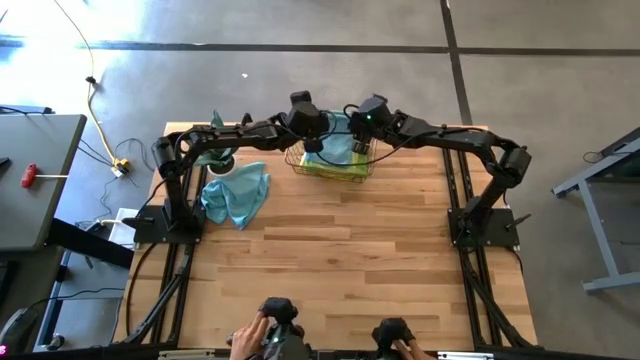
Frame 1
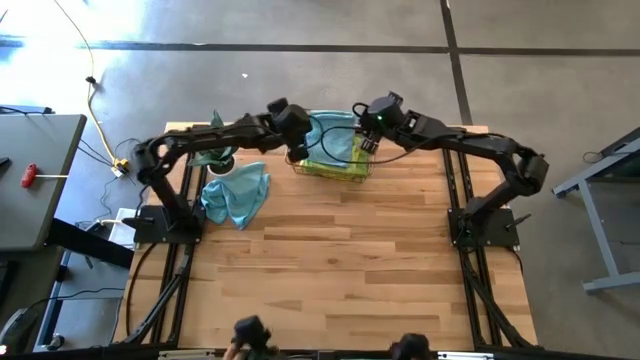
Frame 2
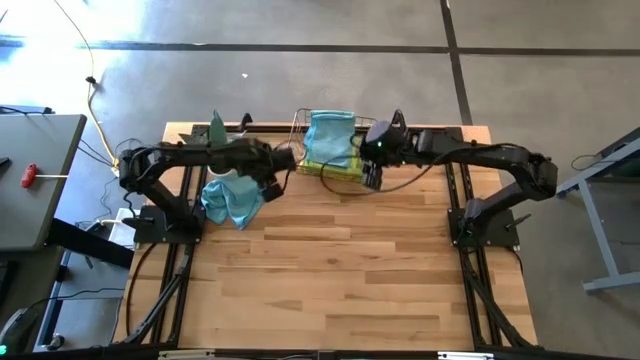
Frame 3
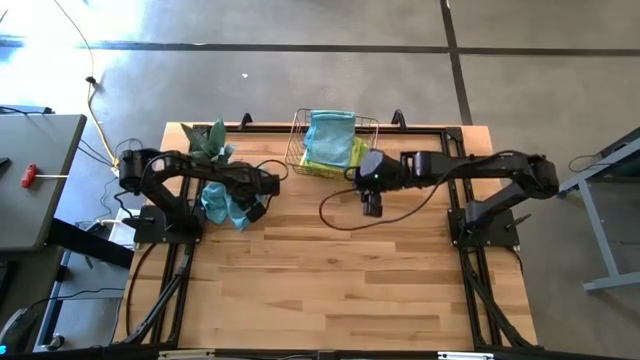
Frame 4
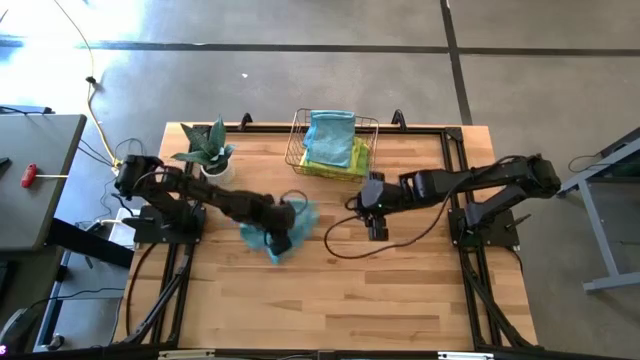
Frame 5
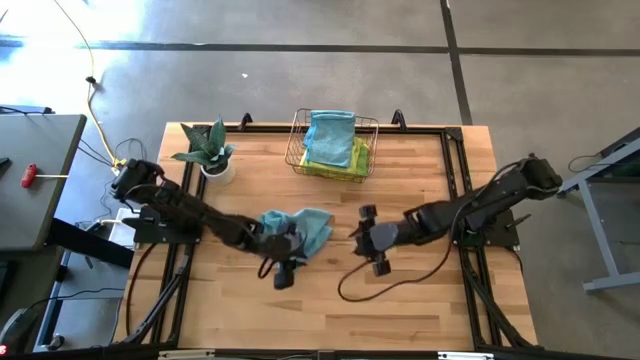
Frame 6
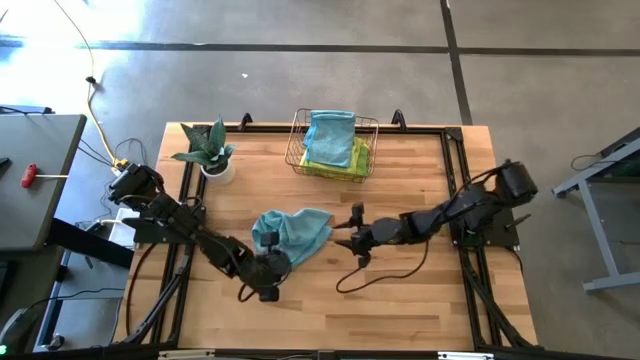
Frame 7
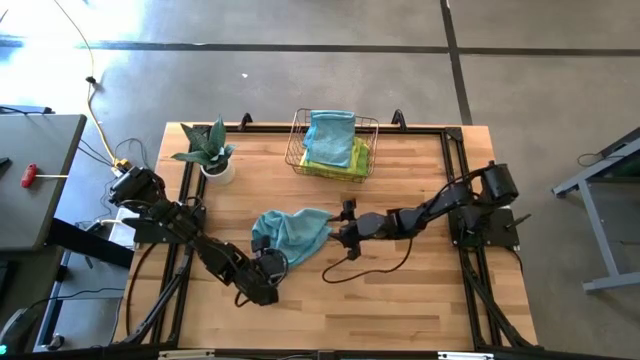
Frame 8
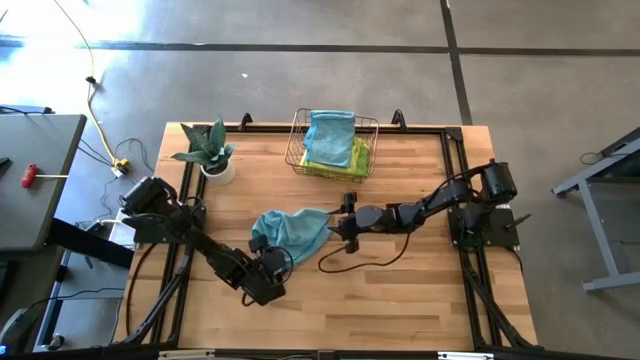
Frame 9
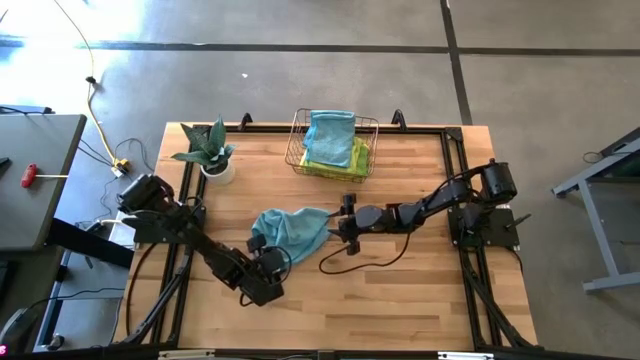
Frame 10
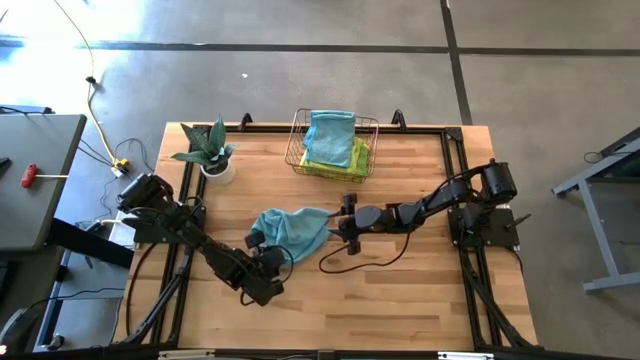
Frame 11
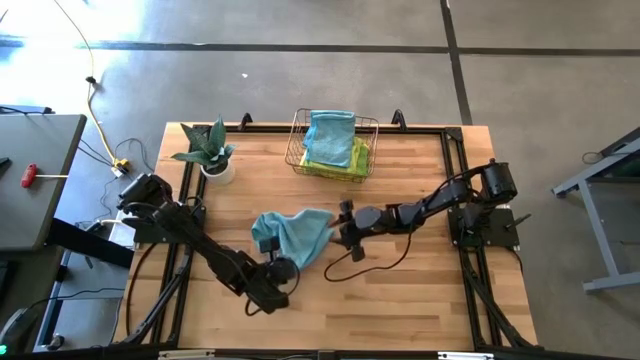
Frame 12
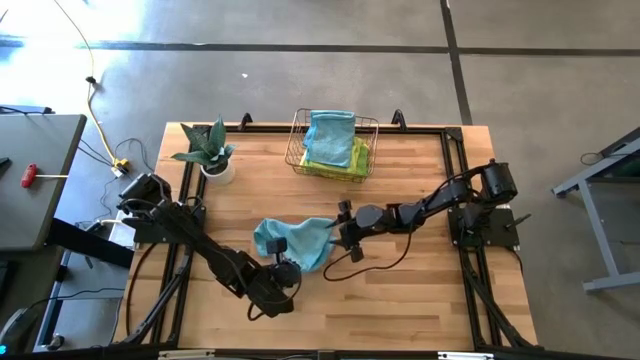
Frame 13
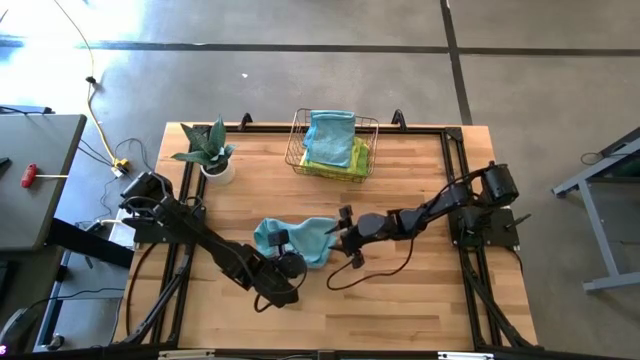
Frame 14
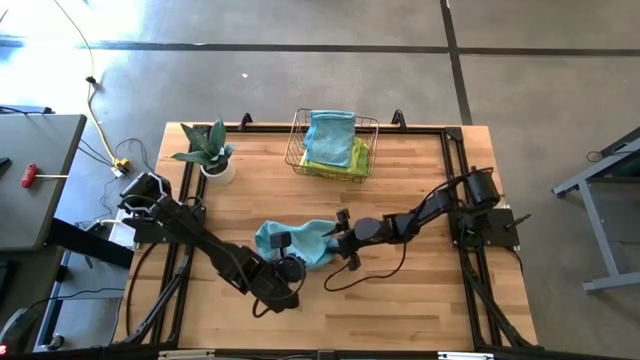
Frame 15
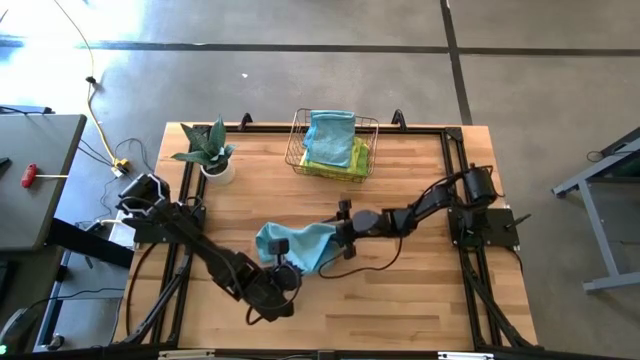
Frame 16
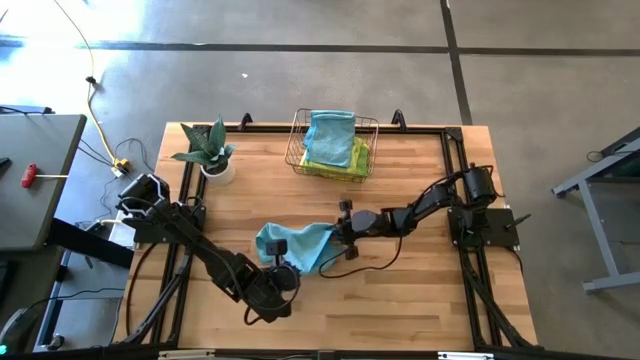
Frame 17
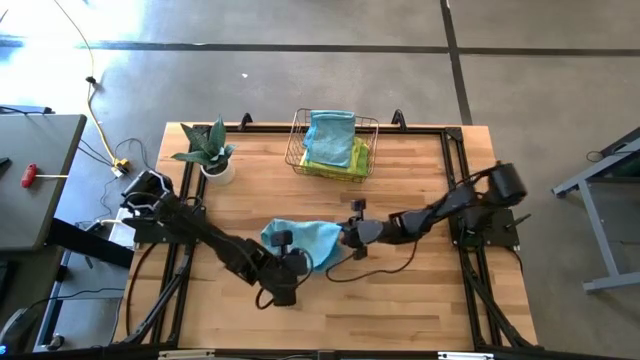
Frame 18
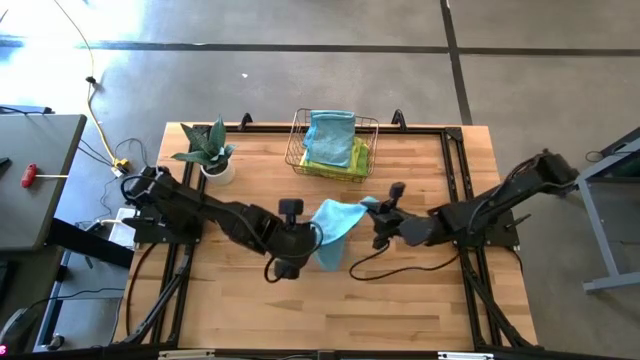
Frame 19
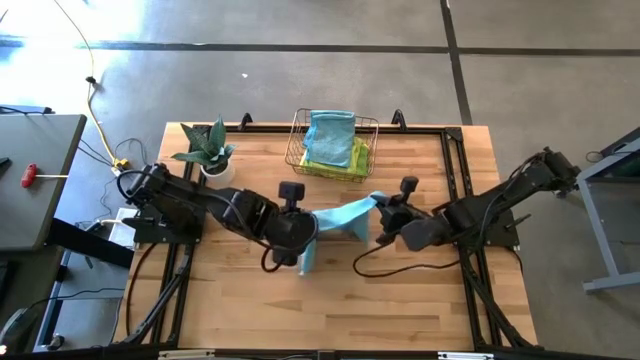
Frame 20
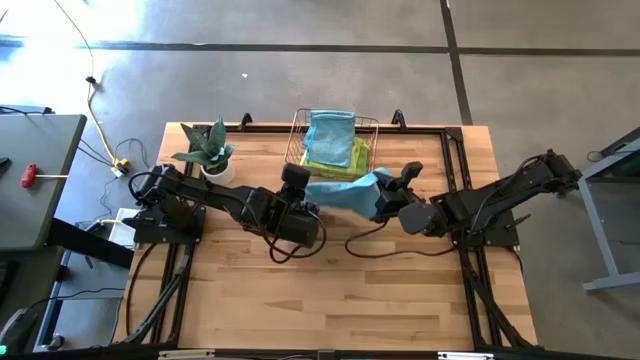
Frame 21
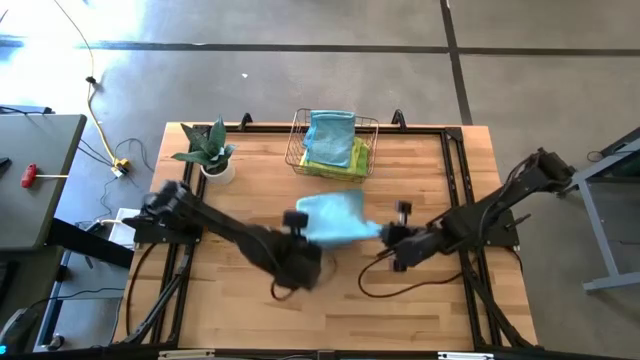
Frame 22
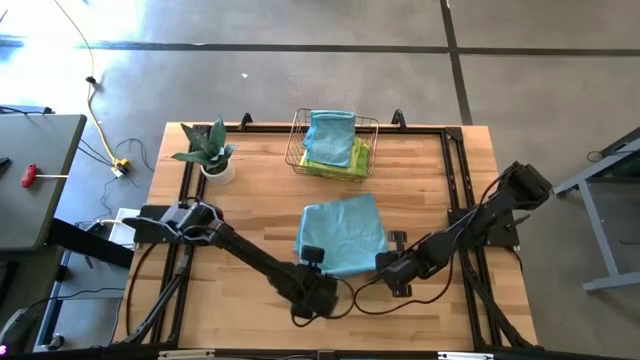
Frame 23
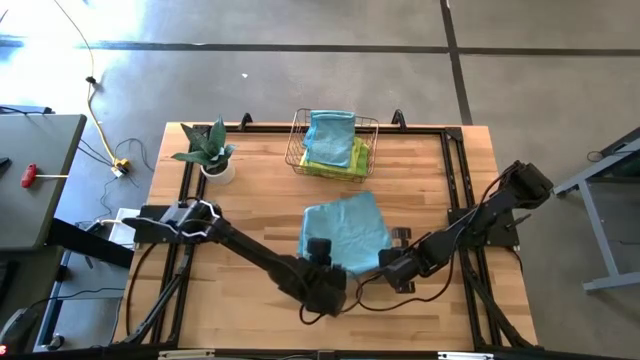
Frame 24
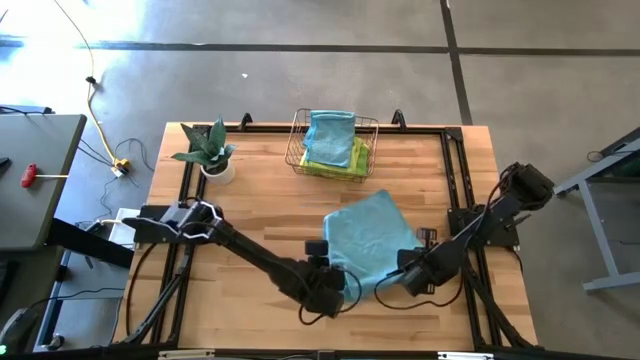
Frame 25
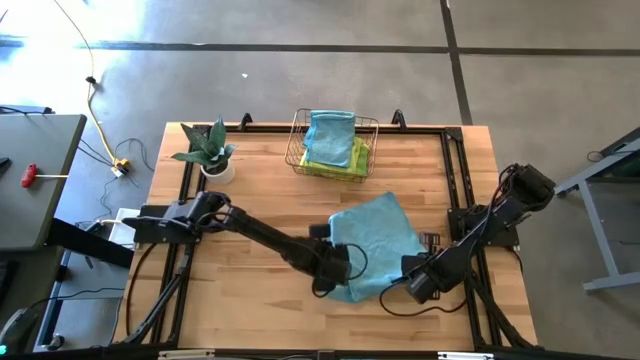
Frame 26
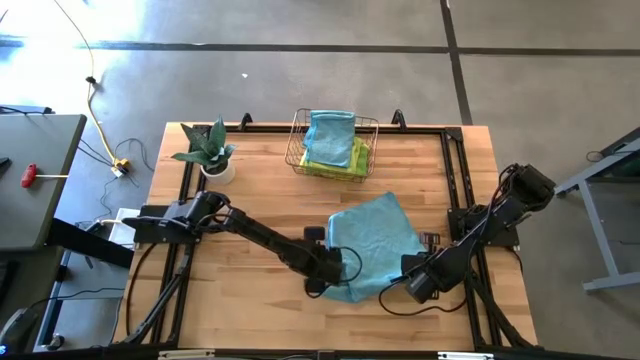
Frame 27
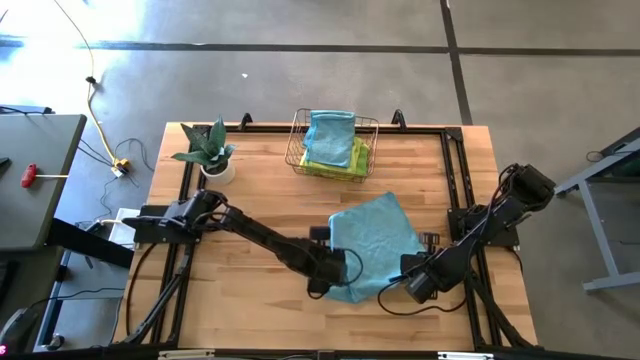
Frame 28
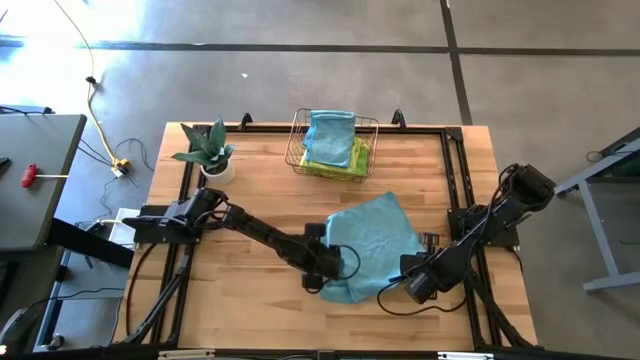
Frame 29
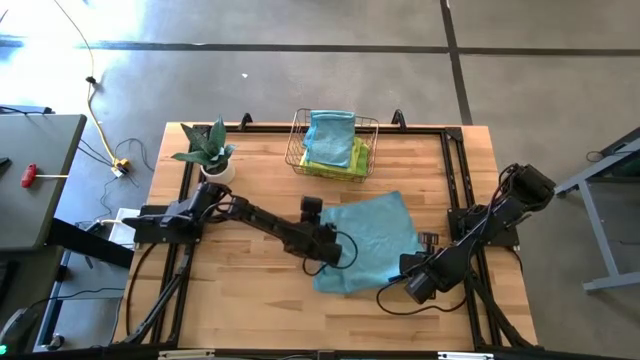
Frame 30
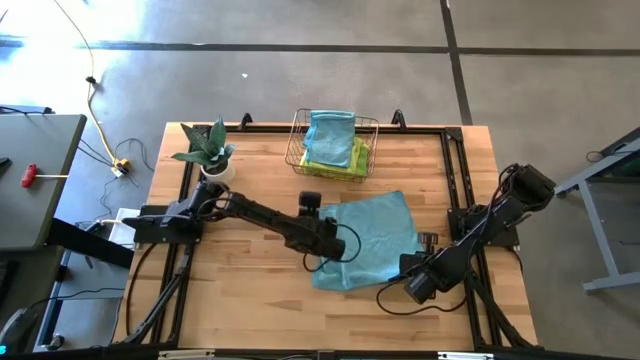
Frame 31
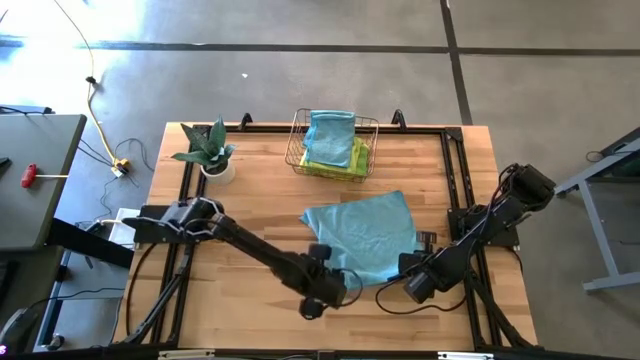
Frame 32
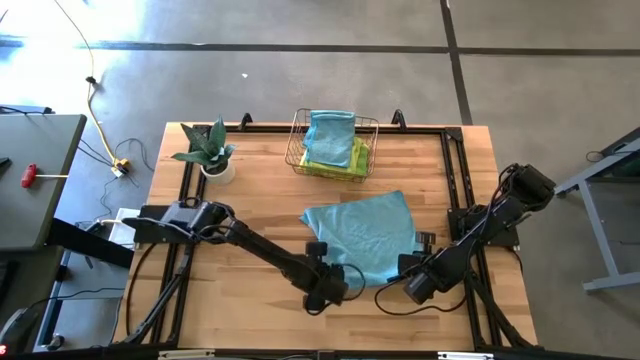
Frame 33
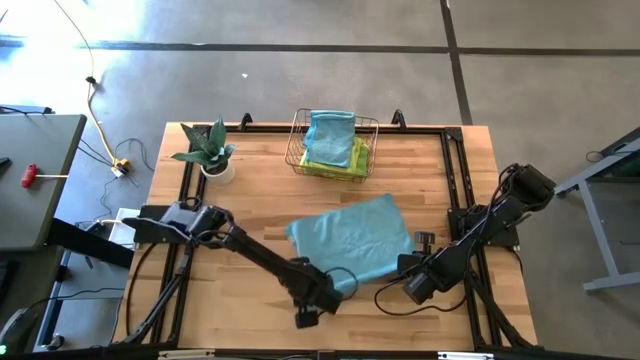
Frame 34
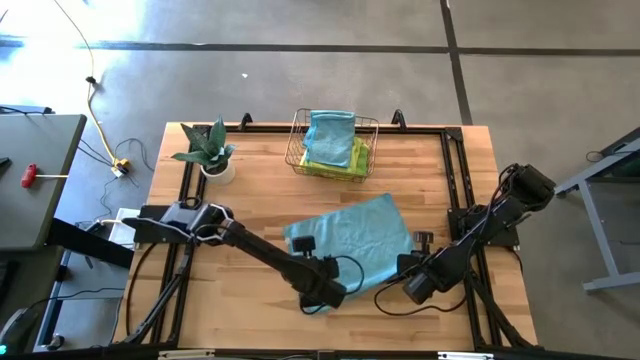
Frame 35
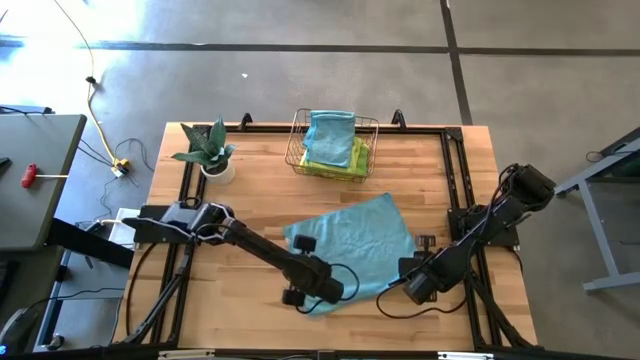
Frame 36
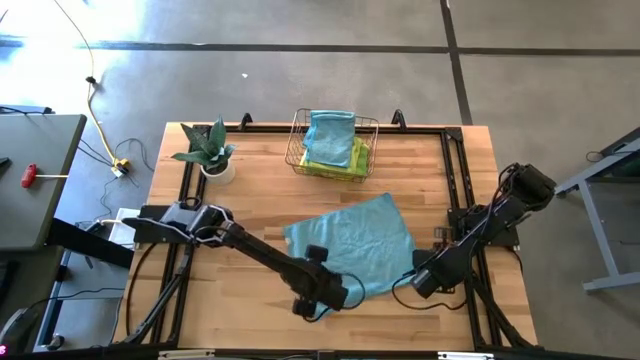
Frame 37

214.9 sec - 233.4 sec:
Task: Fold microfiber towels
Fold the blue microfiber towel

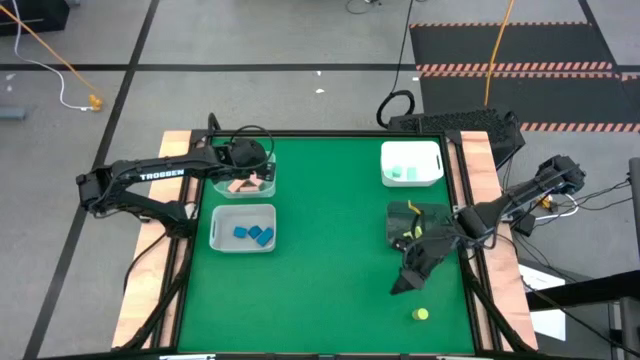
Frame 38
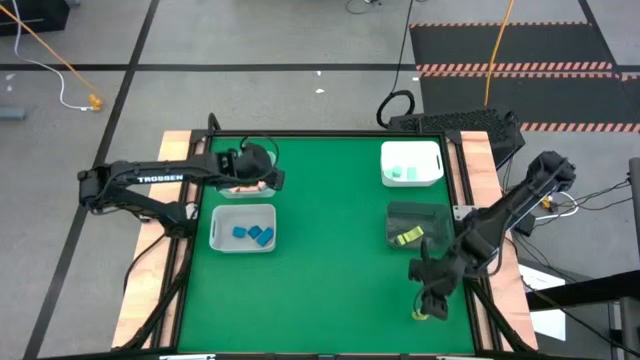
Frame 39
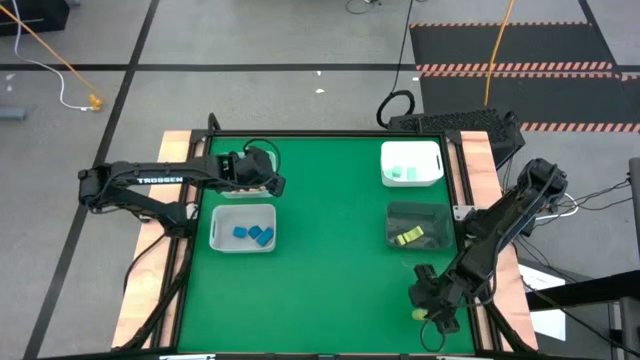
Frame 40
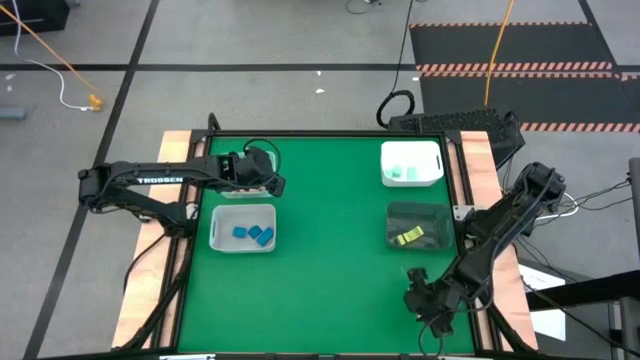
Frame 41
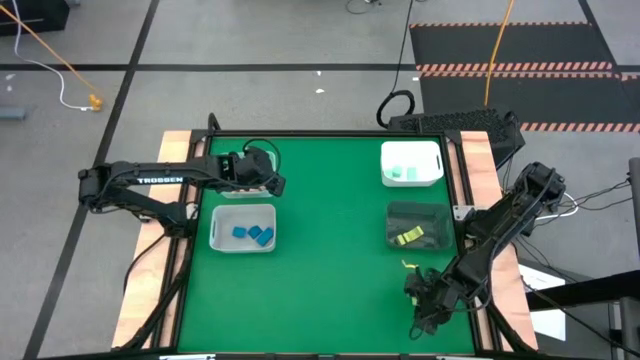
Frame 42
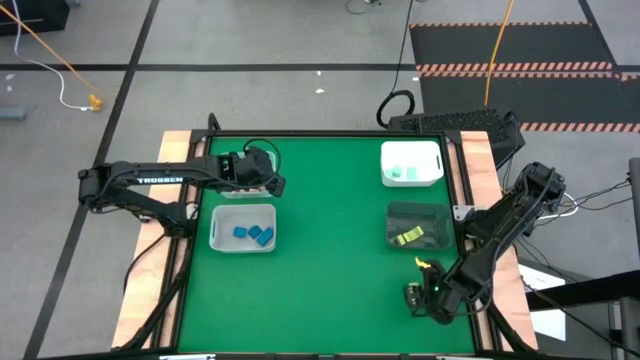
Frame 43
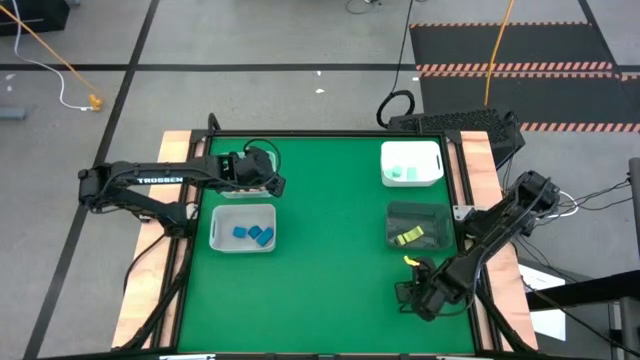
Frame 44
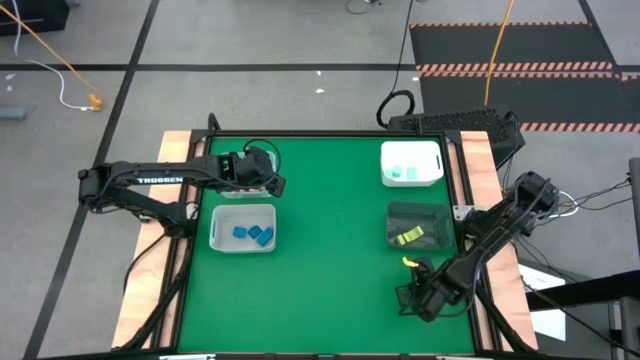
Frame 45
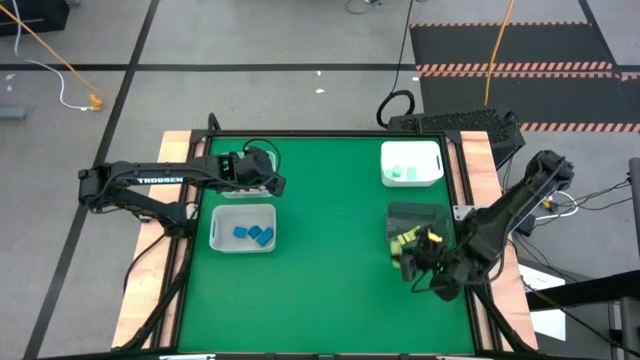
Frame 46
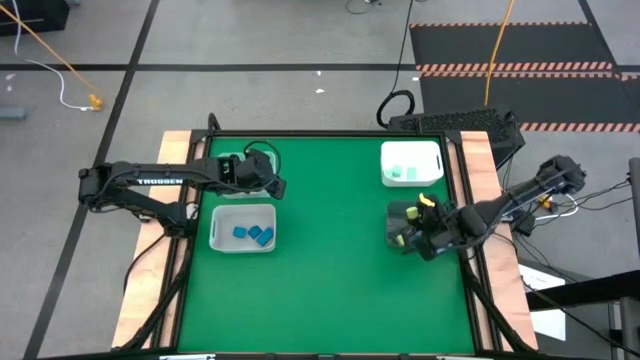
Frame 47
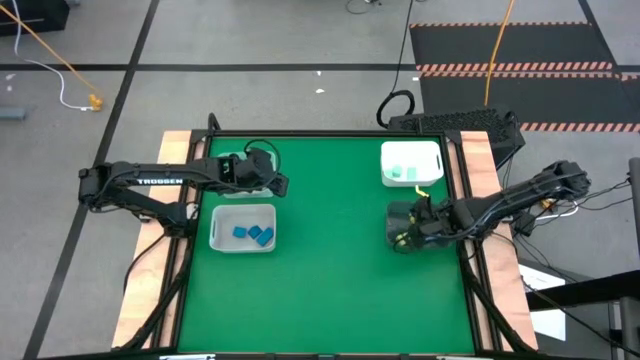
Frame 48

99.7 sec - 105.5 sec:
Task: Sort & place blocks by color
Put the yellow block into the black bin
